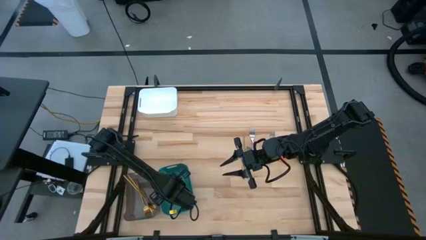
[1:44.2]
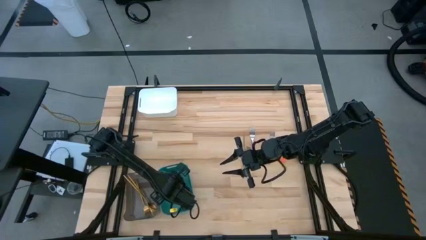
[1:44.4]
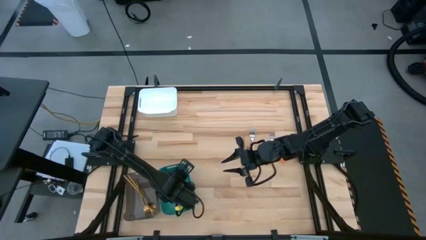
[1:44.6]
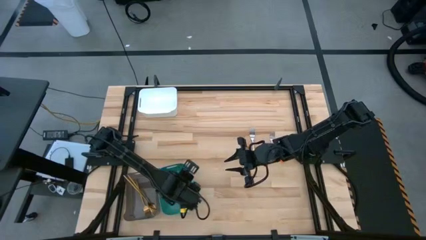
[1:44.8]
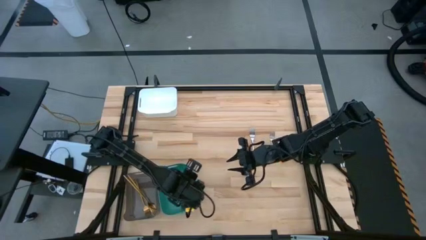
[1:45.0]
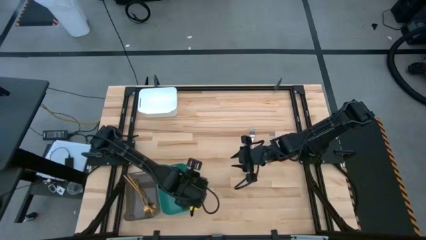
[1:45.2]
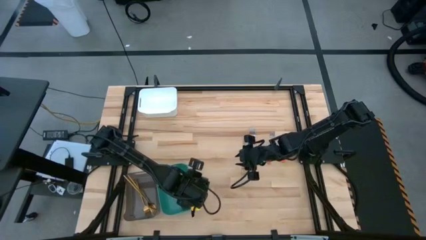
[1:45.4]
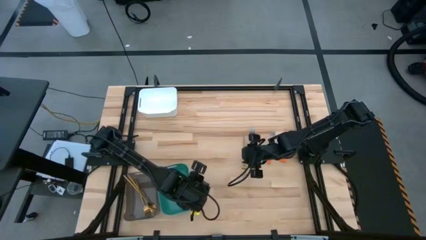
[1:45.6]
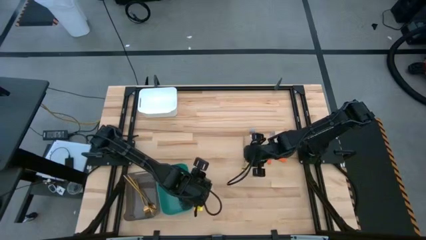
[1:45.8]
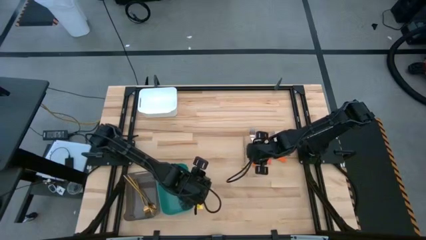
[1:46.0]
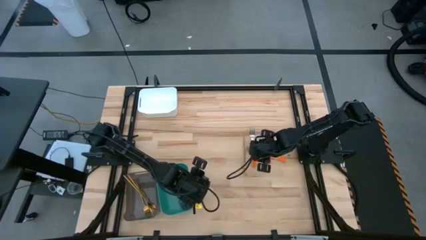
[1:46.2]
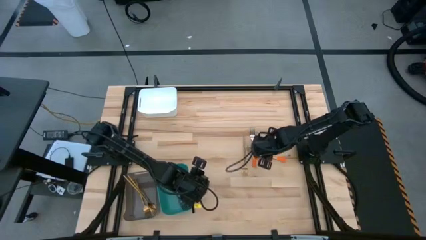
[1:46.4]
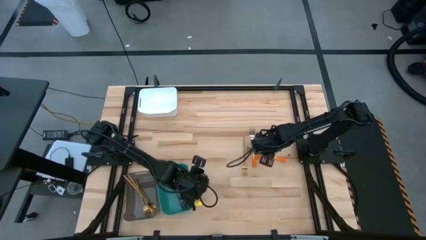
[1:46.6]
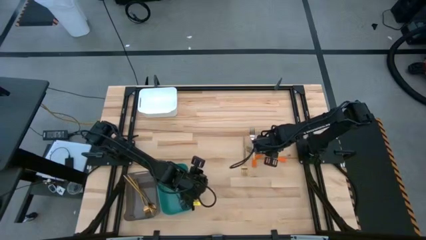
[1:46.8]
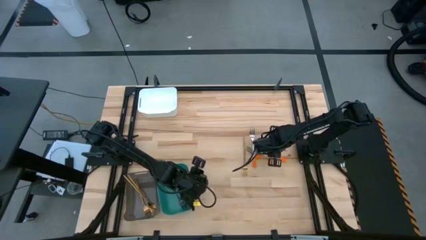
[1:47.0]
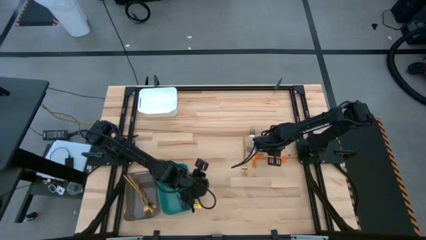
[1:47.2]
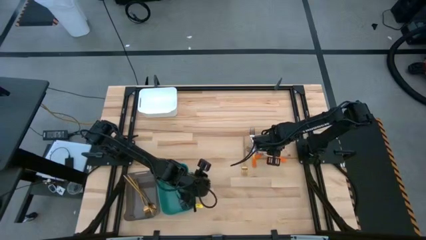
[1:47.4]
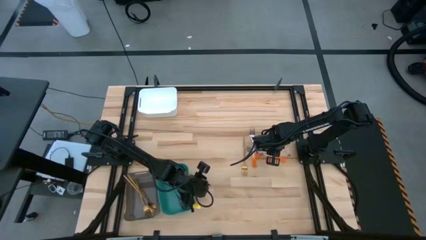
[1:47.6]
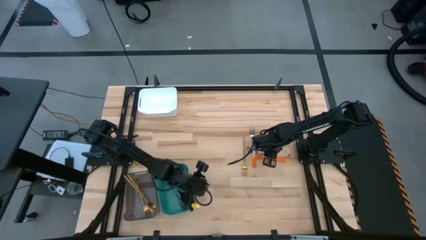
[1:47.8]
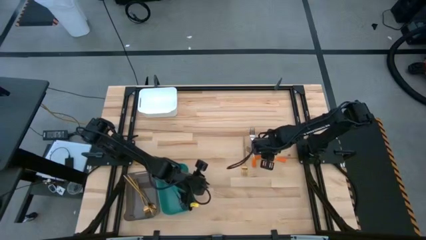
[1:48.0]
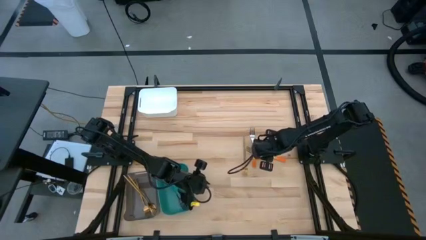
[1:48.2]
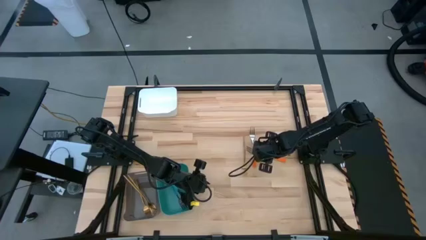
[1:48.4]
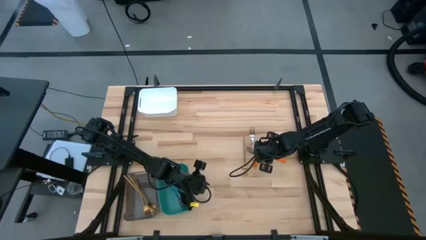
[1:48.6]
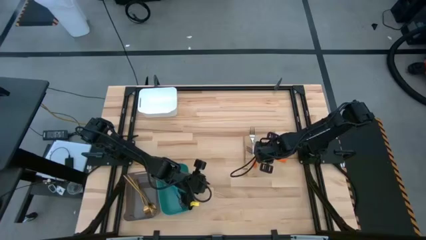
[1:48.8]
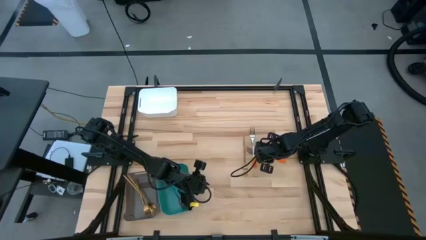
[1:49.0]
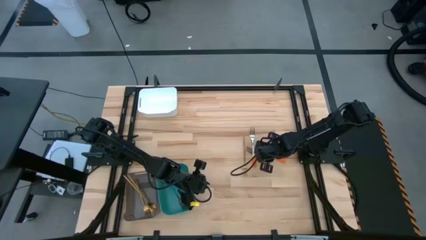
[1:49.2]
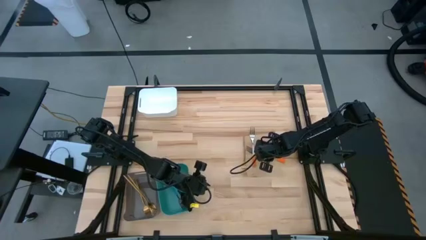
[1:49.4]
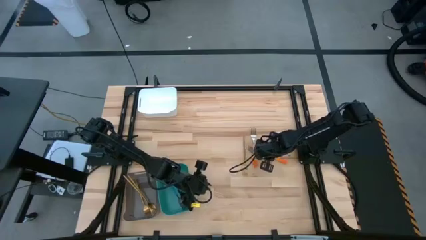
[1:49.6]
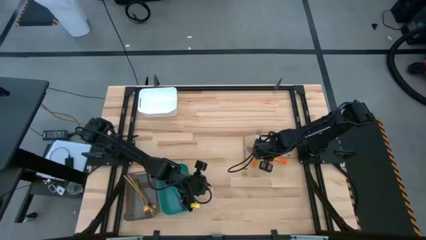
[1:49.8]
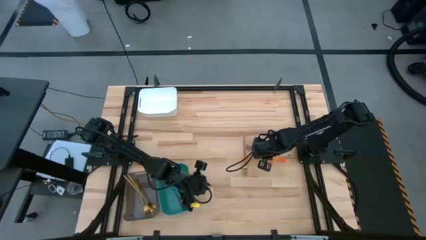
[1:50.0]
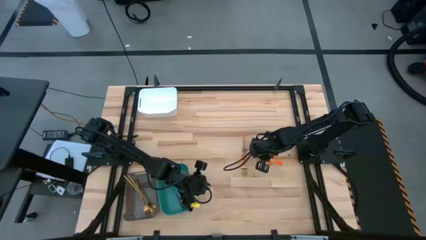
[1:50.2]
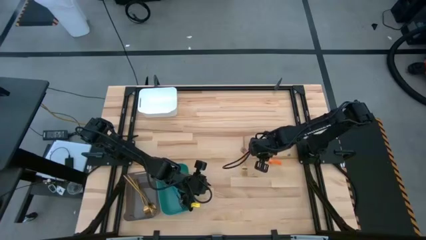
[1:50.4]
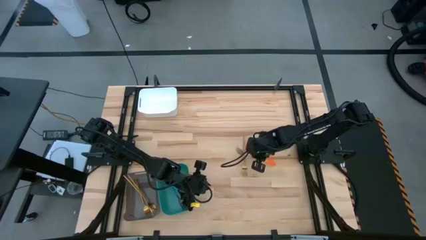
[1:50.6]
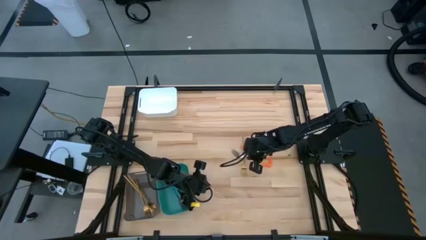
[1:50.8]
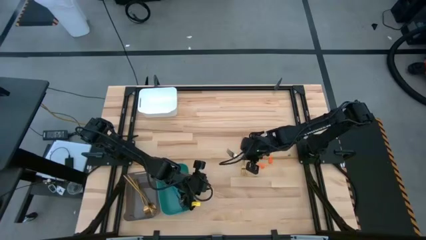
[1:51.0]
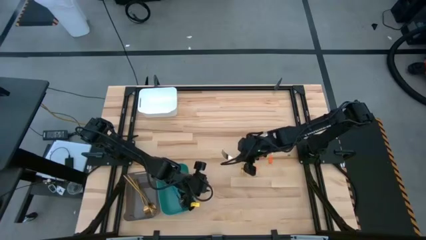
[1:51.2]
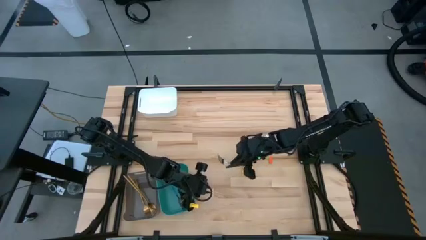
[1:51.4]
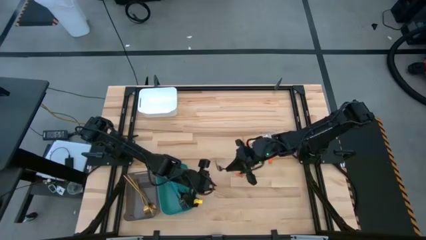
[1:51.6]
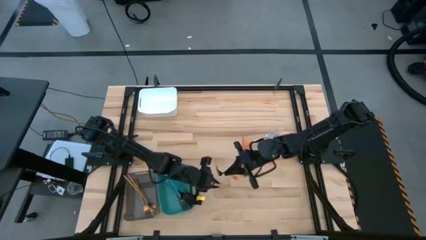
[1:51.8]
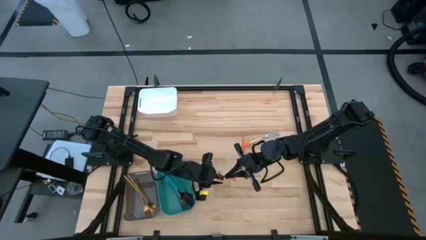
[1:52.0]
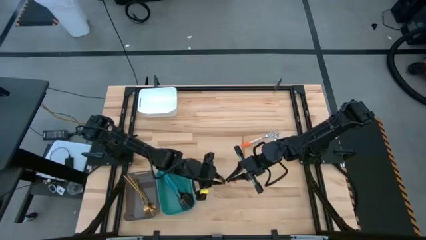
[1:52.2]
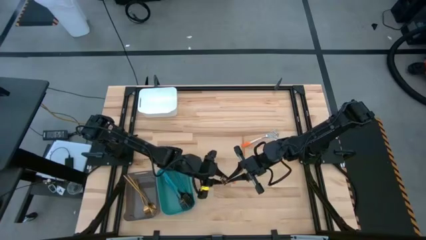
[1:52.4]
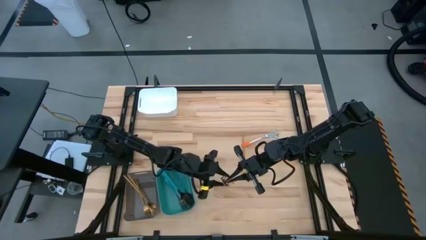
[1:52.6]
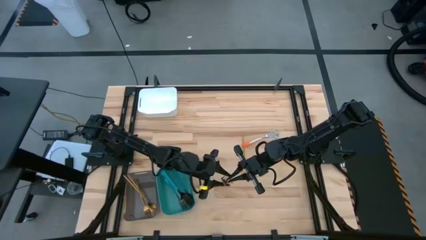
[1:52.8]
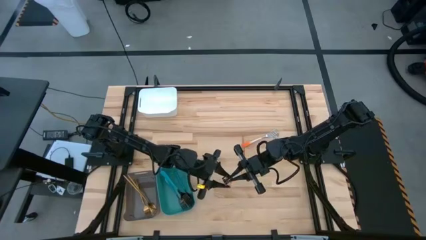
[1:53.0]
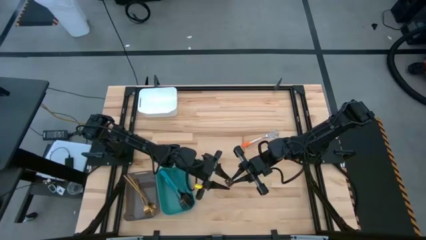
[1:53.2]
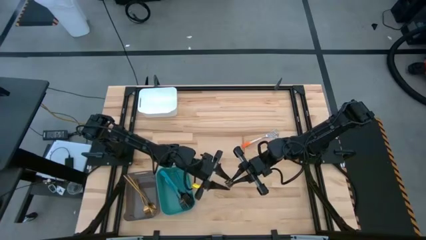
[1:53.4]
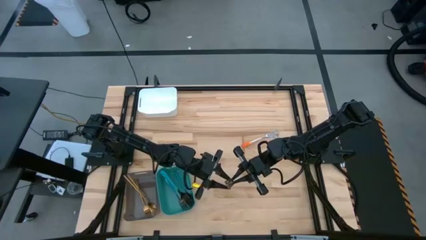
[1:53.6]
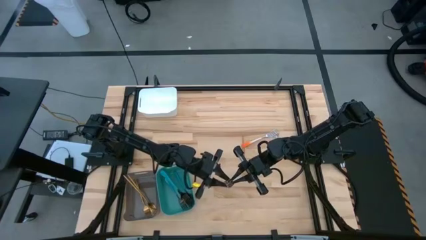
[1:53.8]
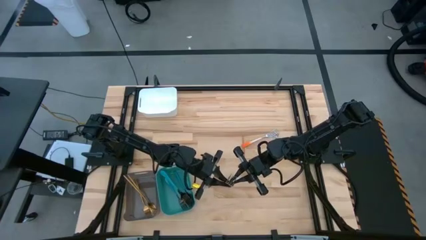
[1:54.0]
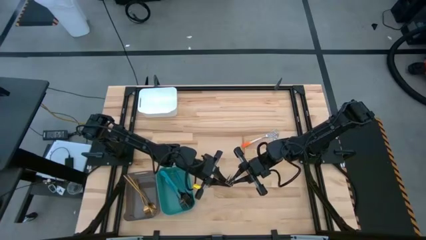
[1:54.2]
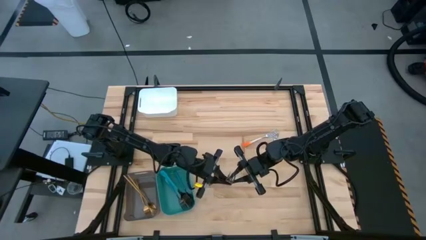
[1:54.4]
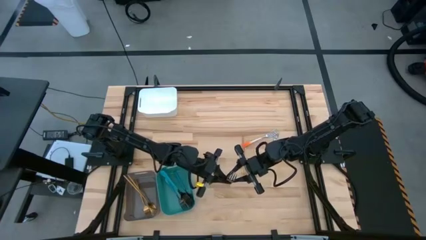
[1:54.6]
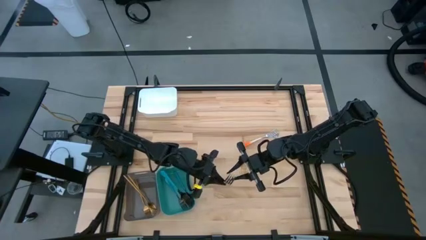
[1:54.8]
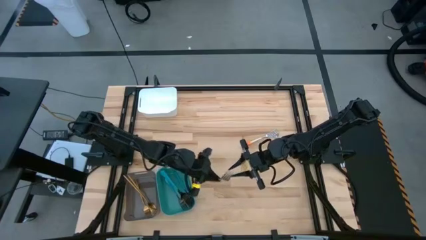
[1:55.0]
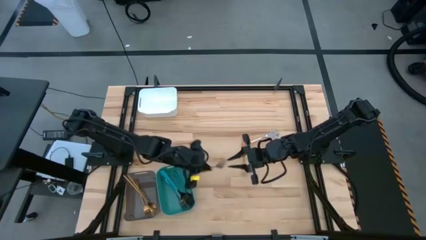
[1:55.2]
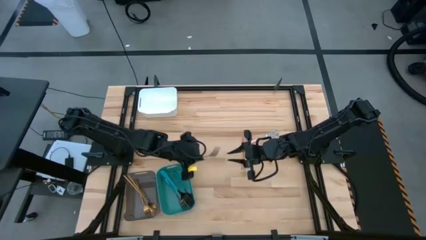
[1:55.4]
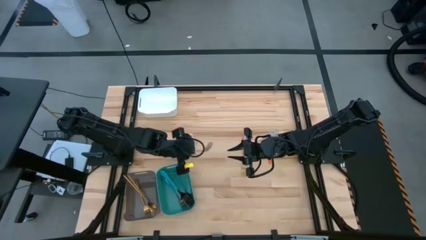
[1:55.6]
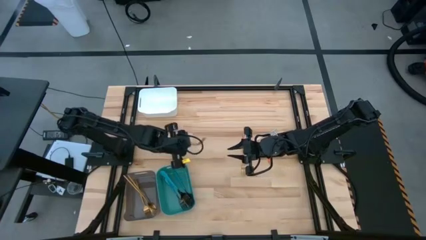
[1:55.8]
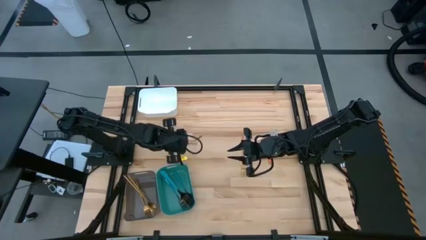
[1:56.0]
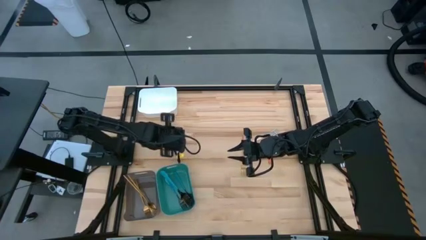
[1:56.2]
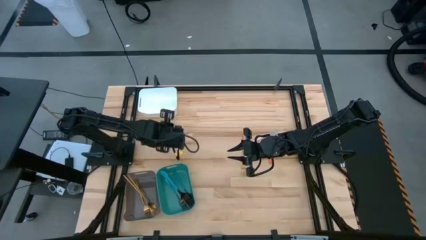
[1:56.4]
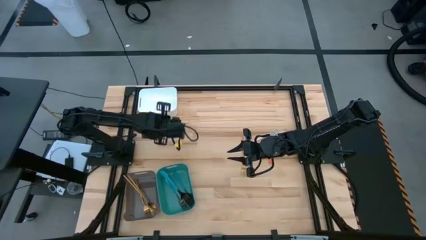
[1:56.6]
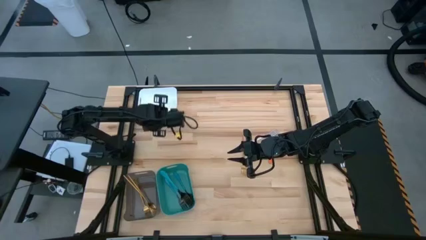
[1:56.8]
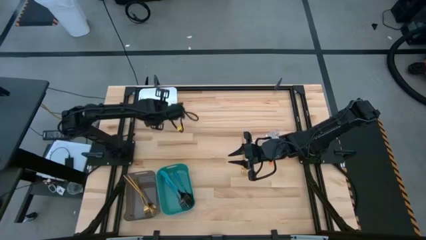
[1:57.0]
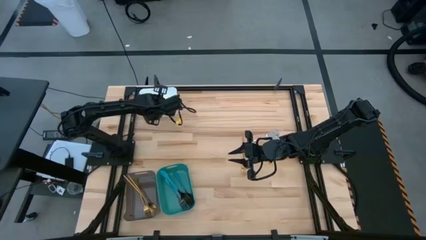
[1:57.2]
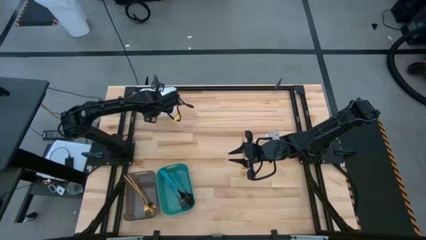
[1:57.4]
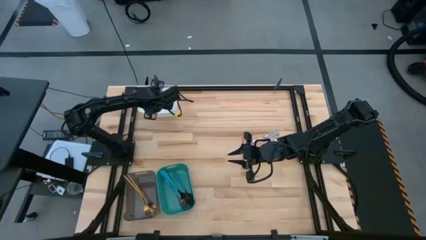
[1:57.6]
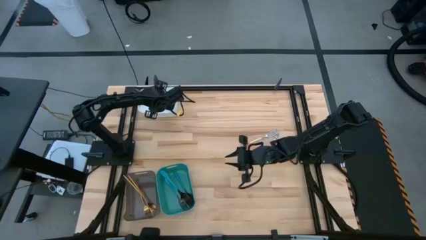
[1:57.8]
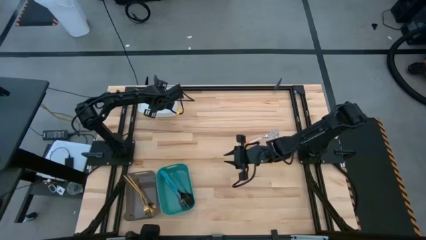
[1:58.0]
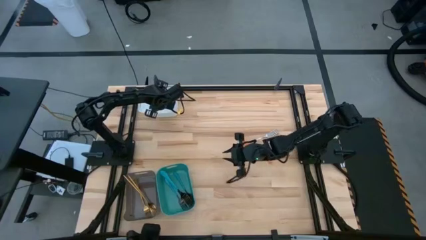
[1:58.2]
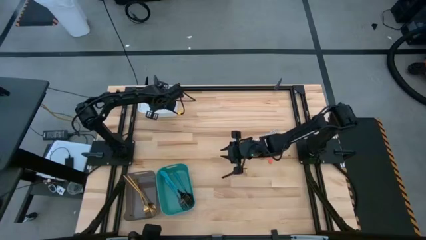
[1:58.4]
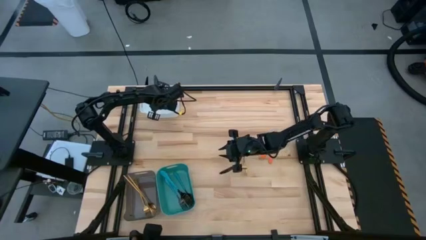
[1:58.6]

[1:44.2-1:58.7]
Task: Sort silverware by color (type)
Put the orange fork into the white bin
